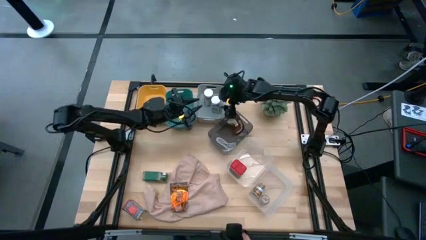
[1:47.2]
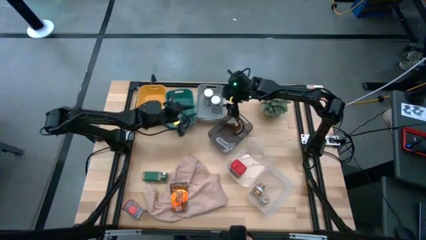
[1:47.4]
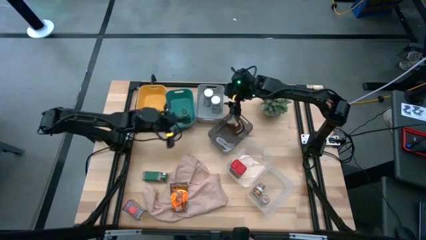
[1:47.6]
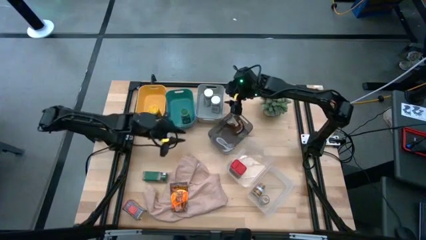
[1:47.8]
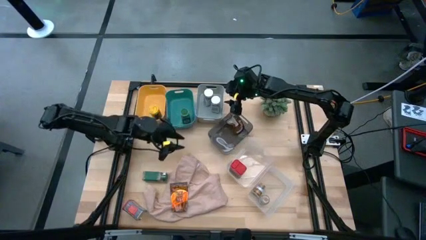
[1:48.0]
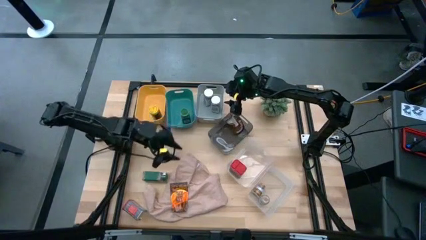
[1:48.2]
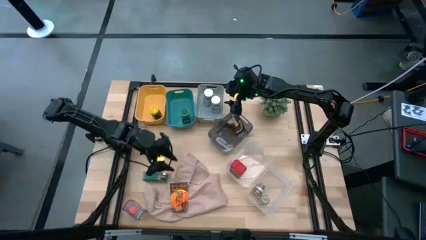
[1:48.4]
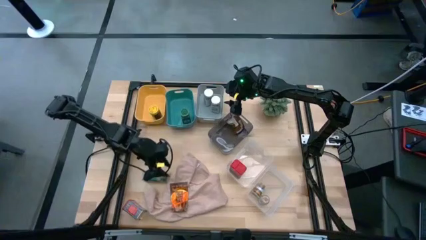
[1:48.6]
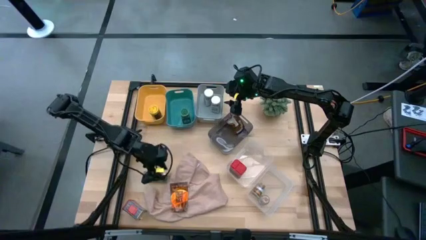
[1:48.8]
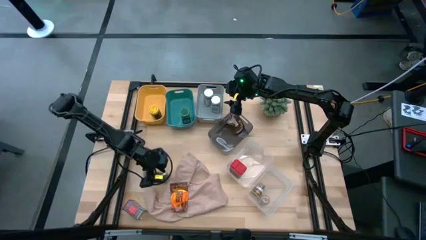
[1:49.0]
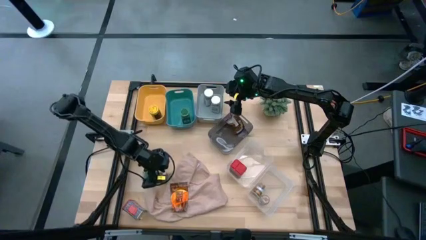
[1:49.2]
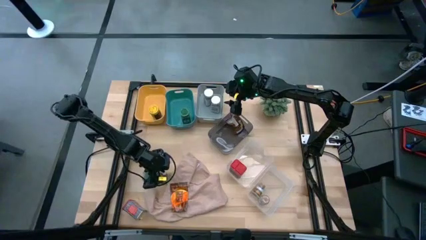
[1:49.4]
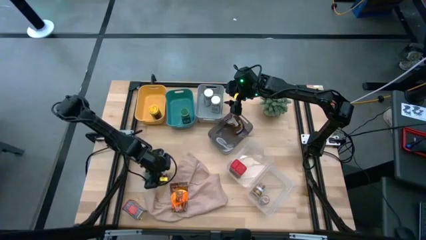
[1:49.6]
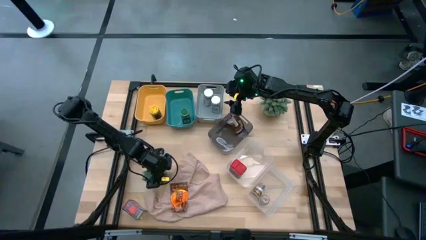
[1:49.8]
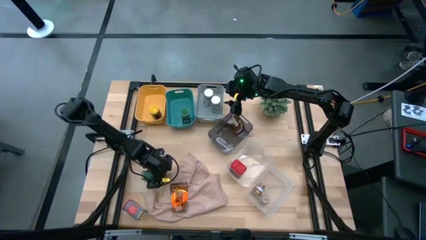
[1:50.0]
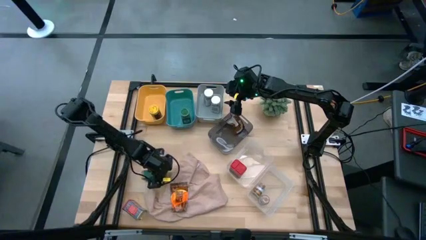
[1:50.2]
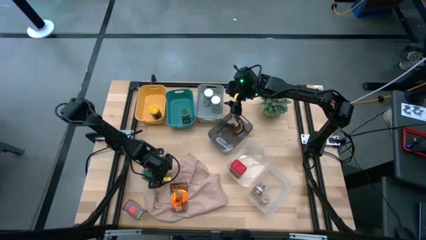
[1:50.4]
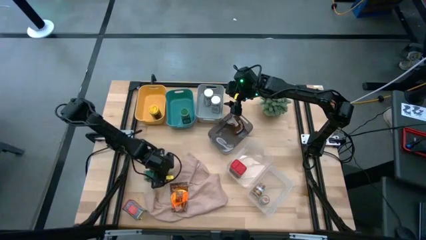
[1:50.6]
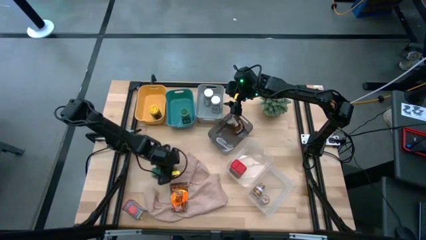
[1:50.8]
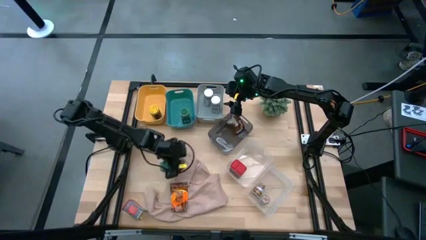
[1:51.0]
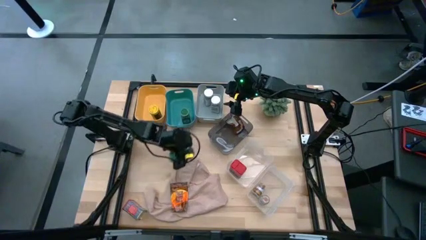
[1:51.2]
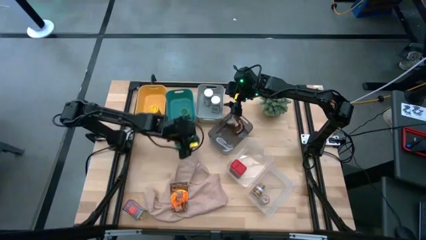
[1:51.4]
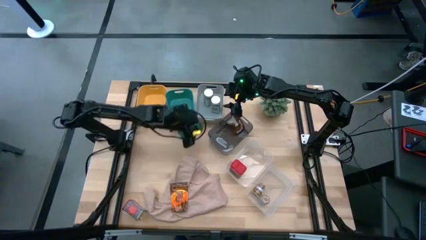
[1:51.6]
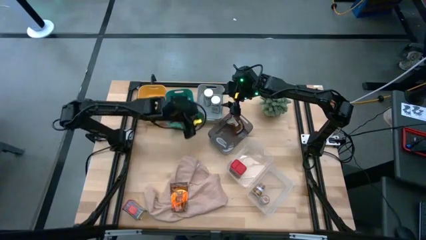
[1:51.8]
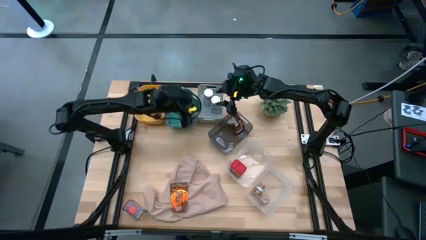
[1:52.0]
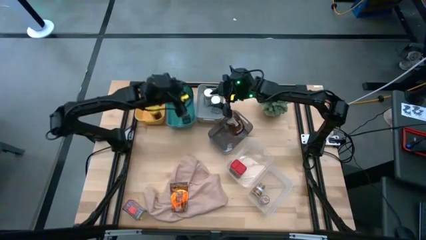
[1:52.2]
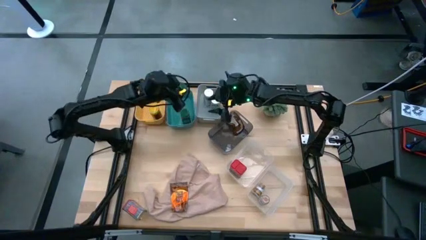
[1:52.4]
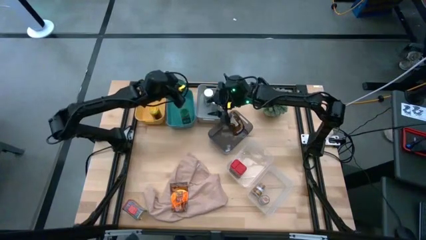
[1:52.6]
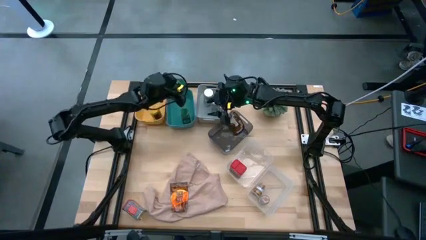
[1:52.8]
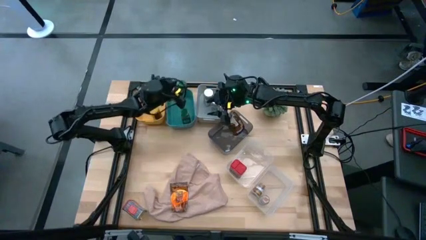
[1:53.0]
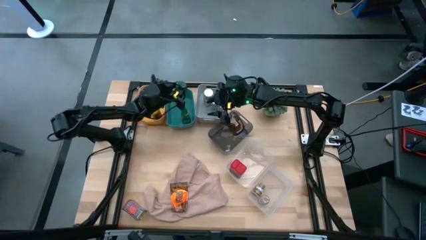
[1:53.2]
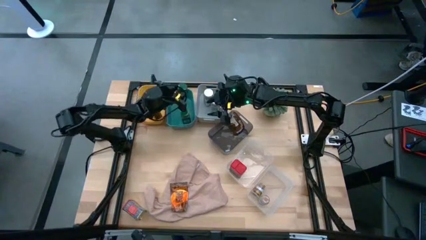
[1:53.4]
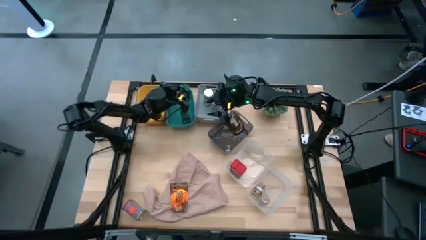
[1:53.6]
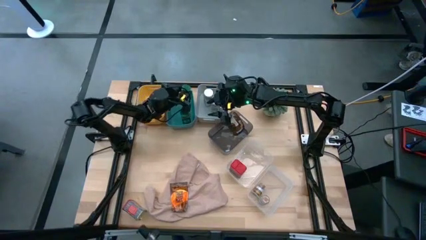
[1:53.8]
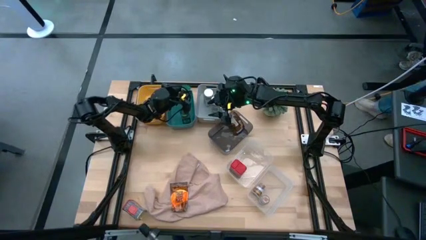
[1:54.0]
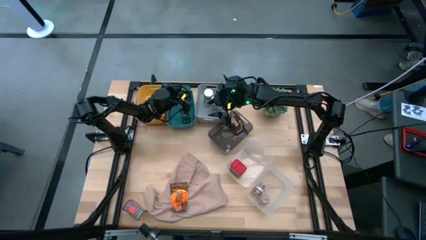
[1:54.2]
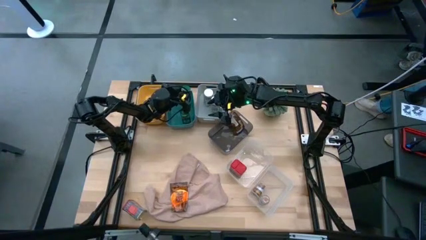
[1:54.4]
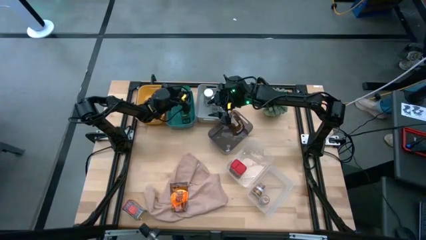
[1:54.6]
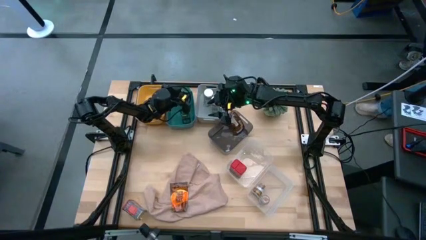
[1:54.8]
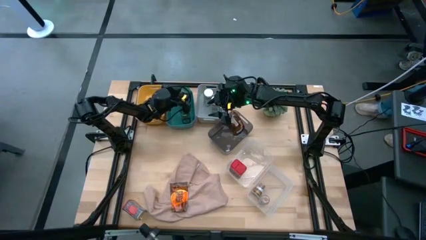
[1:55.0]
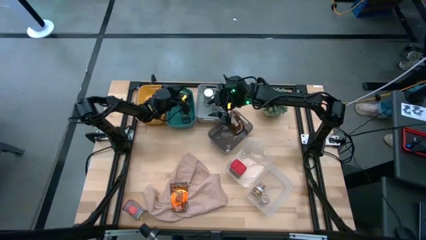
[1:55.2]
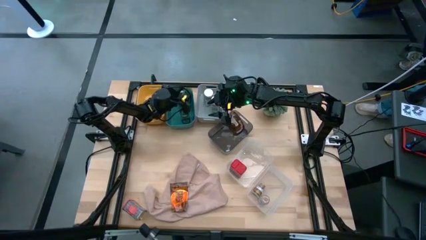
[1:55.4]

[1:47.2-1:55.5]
Task: Sort spices by type
Put the green seasoning bottle into the green bin

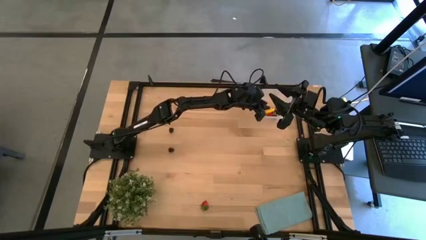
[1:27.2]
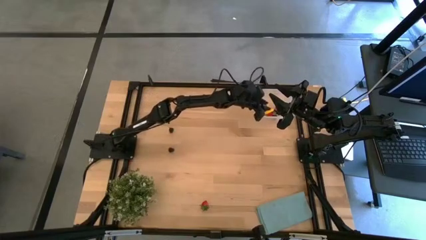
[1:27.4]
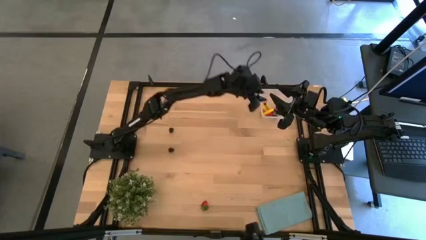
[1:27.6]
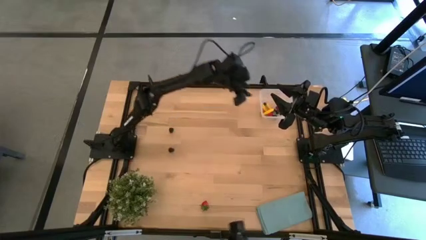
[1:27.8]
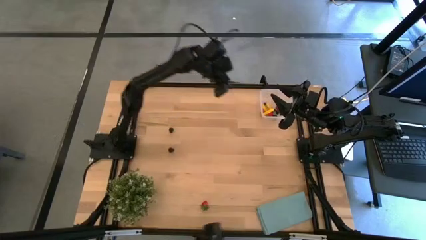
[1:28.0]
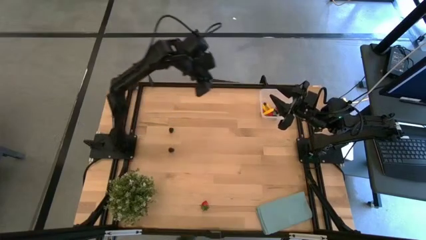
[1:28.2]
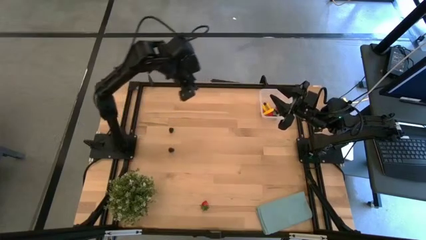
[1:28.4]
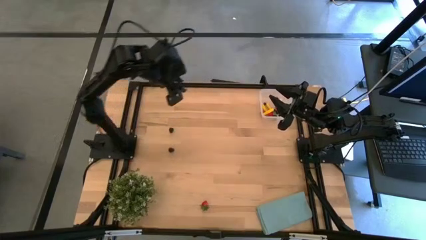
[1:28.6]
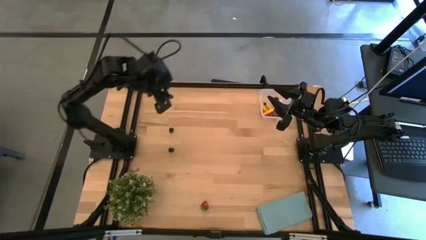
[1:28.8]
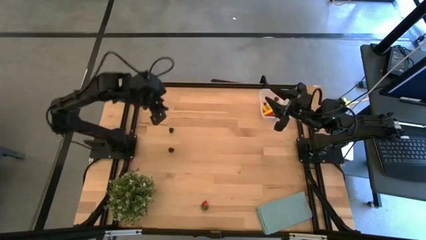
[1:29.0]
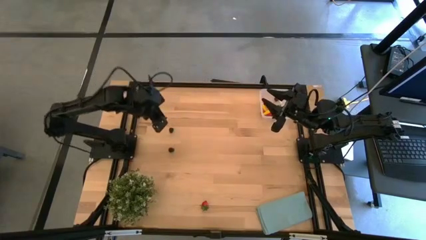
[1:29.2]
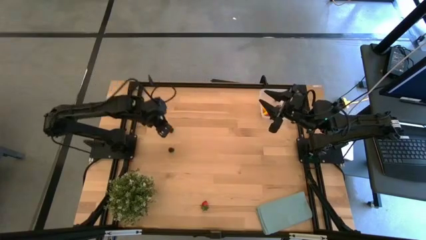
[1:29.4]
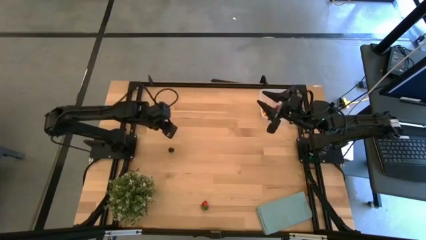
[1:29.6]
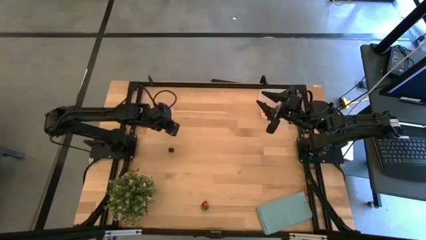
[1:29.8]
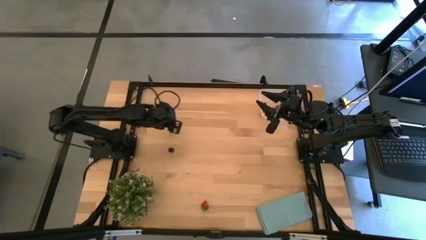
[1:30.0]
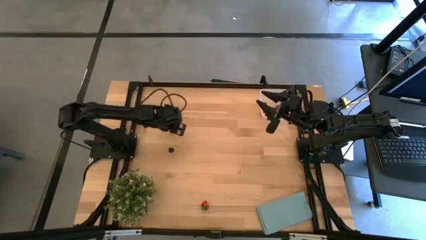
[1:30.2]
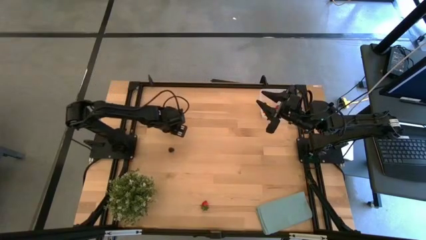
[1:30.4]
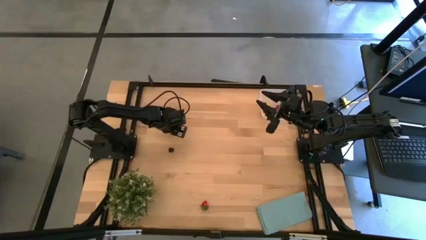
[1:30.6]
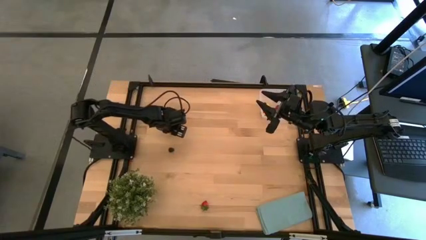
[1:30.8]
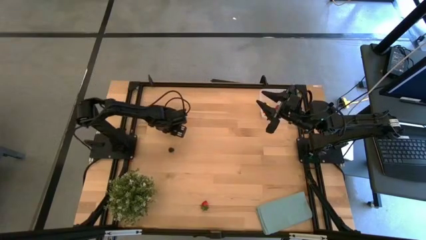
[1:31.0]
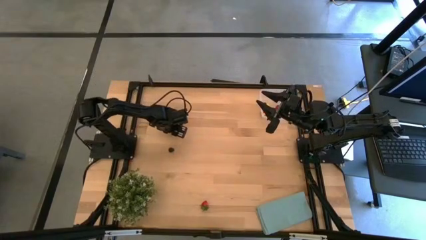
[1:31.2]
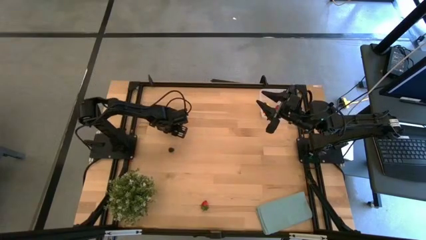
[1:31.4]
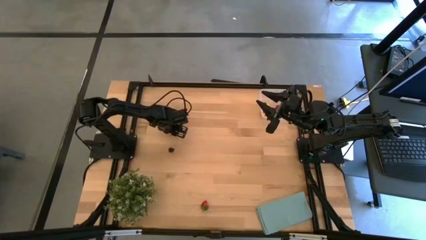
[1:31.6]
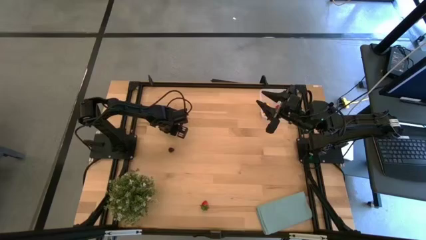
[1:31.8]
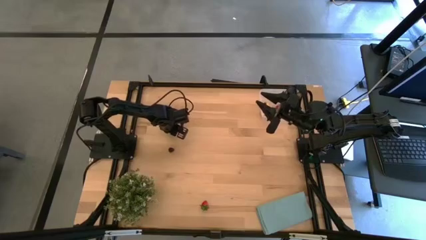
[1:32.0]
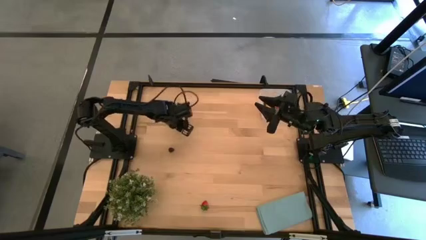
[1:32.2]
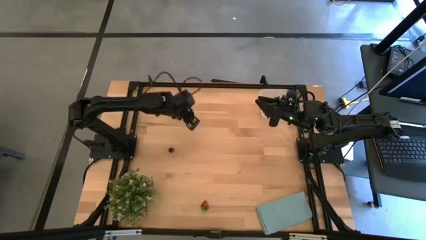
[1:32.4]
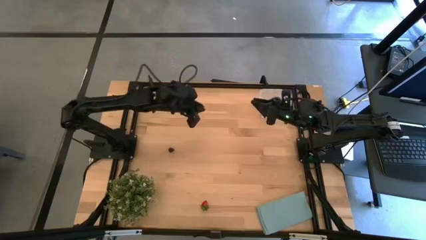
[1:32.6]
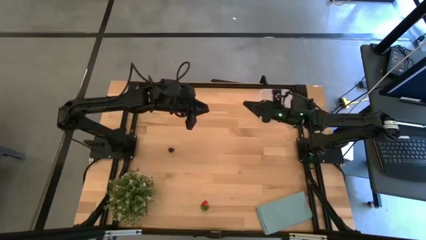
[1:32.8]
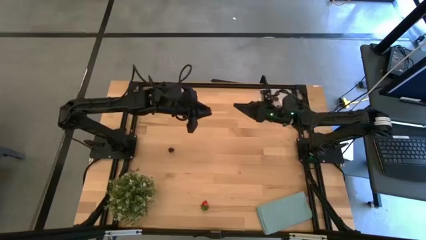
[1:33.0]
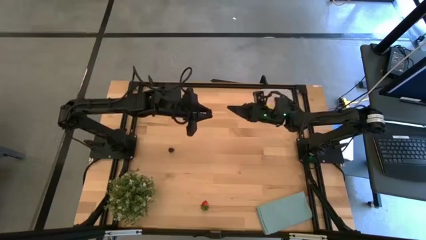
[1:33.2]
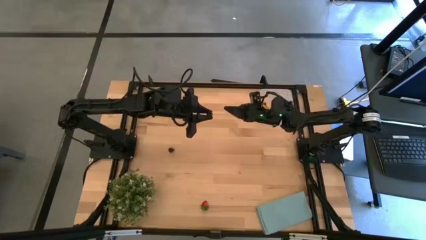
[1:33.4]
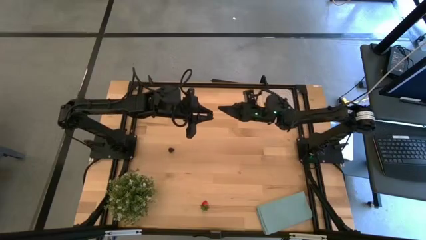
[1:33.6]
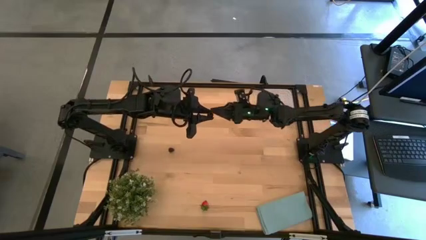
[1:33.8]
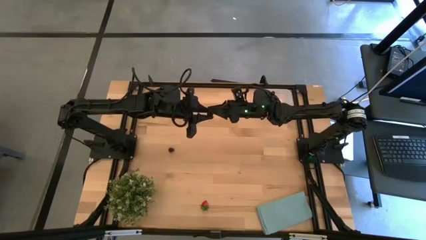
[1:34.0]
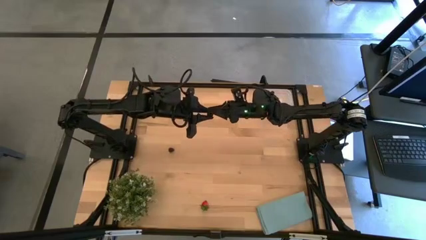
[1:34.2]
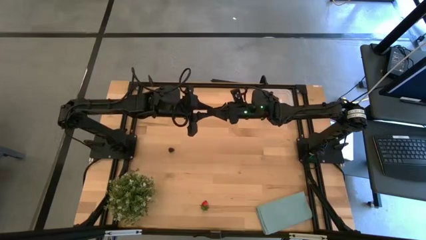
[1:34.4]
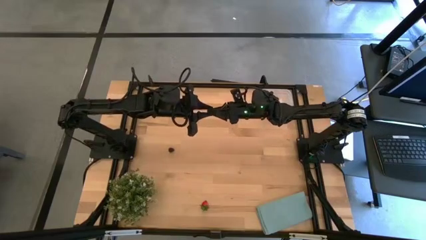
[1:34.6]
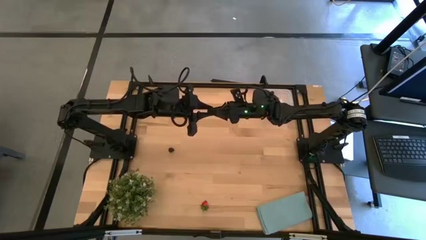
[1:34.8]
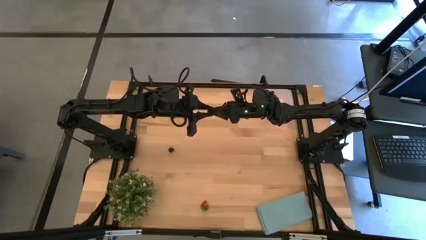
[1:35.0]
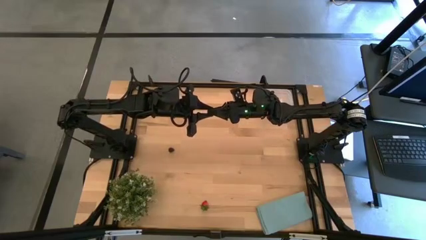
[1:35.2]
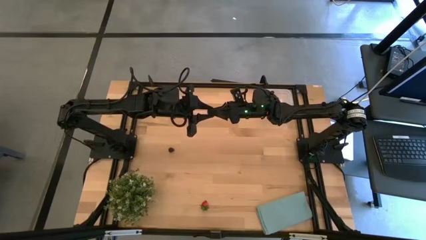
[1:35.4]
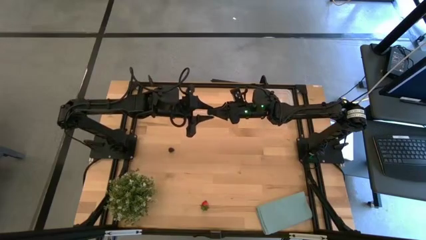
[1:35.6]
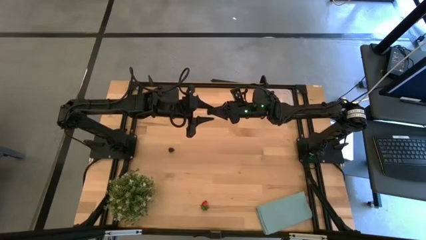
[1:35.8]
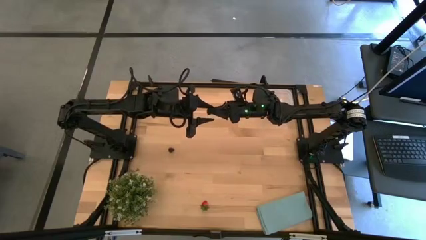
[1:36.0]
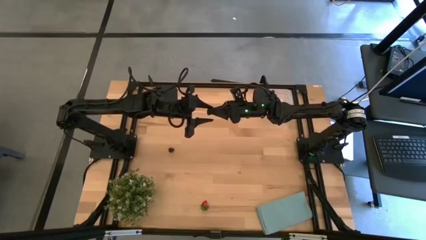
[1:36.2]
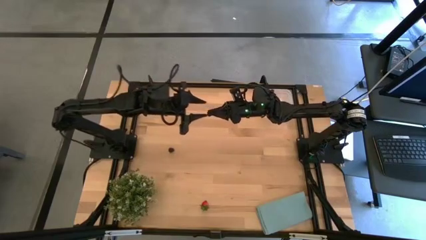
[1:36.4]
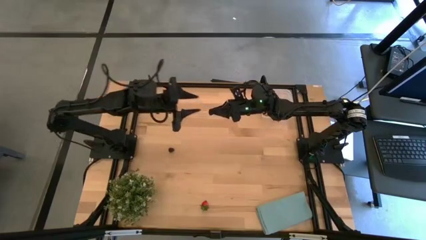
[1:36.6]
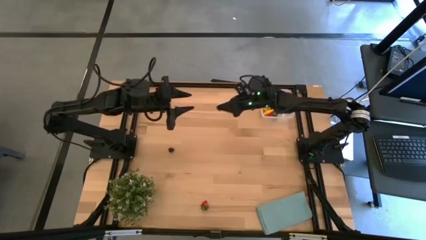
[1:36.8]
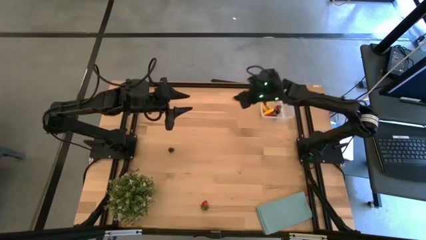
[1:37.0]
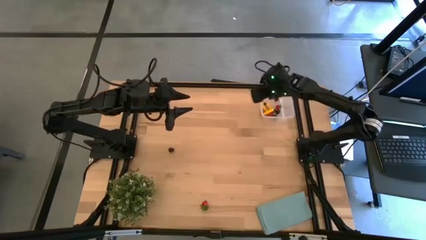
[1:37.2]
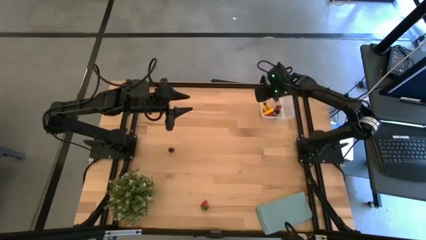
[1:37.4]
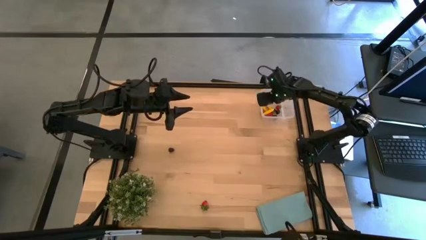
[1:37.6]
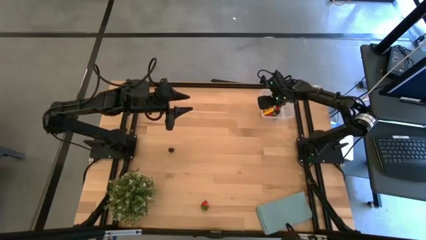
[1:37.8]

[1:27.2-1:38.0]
Task: Pick and placing Produce into tupperware
Put the blackberry into the transparent bin
